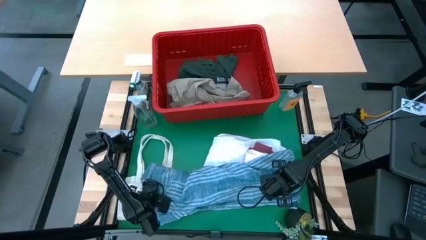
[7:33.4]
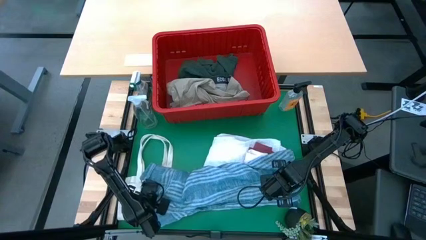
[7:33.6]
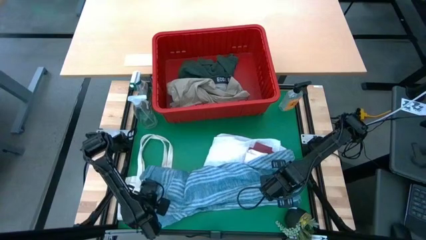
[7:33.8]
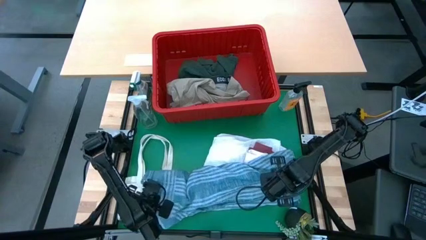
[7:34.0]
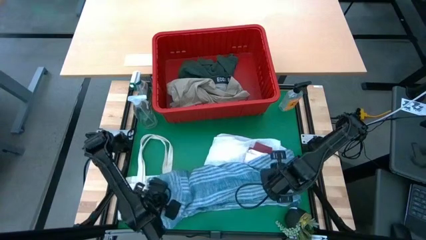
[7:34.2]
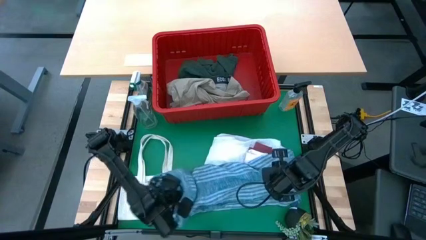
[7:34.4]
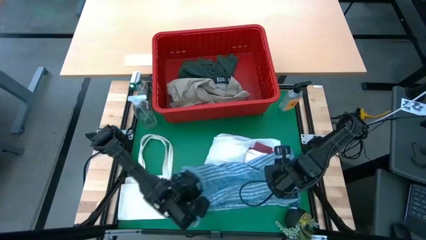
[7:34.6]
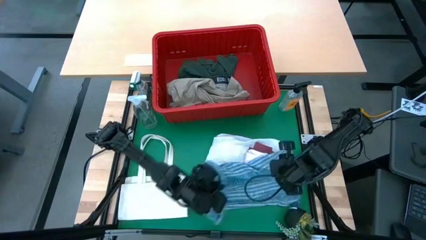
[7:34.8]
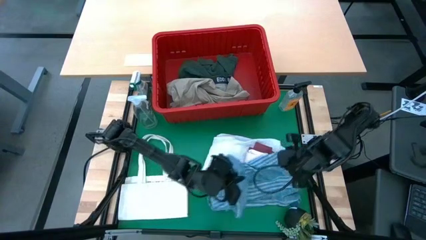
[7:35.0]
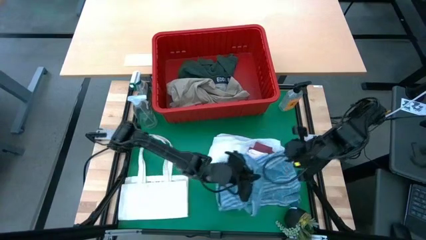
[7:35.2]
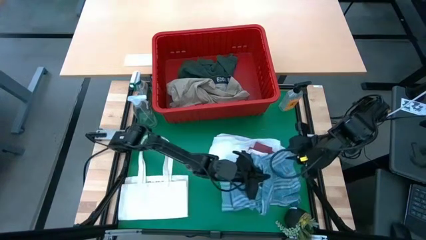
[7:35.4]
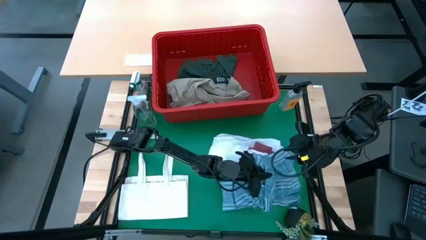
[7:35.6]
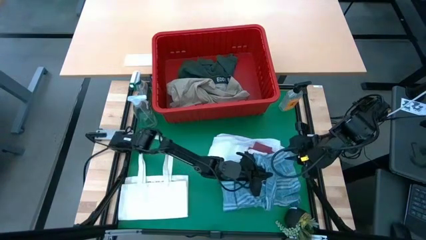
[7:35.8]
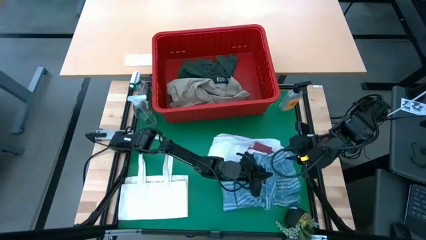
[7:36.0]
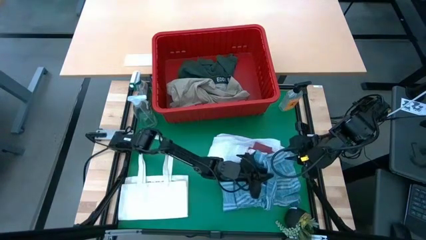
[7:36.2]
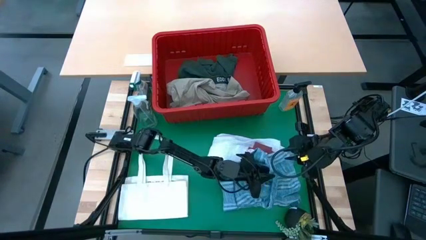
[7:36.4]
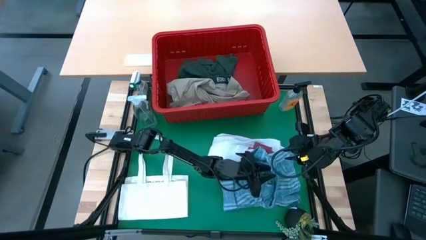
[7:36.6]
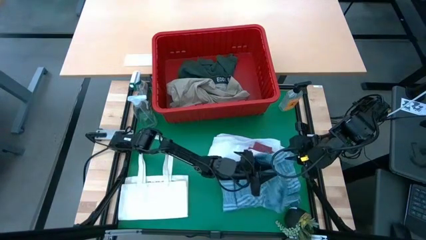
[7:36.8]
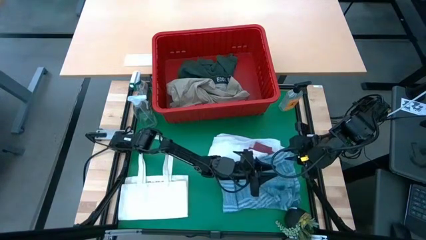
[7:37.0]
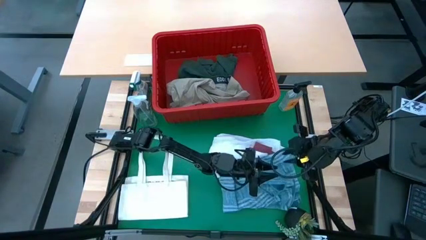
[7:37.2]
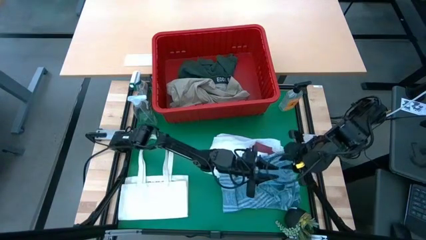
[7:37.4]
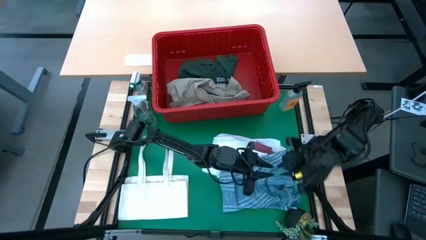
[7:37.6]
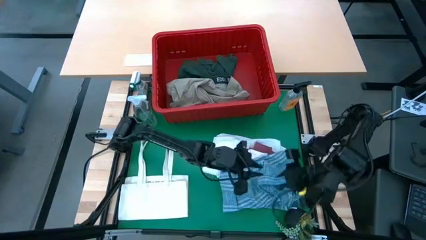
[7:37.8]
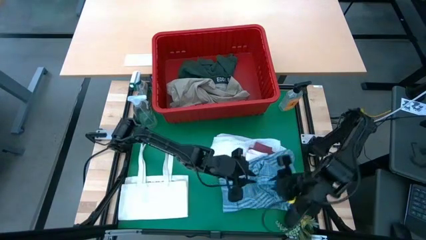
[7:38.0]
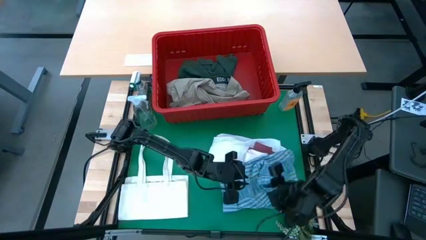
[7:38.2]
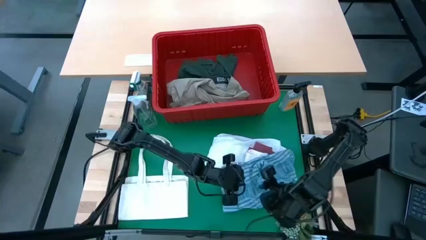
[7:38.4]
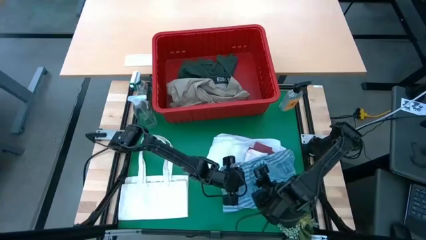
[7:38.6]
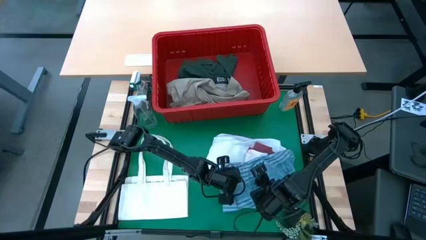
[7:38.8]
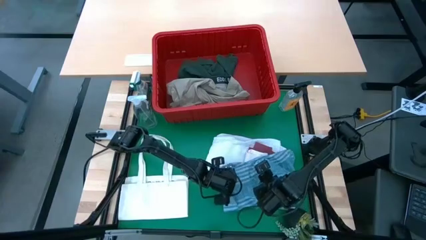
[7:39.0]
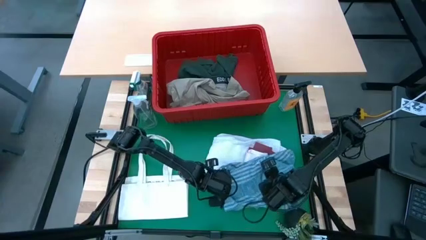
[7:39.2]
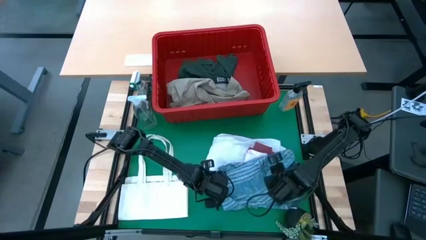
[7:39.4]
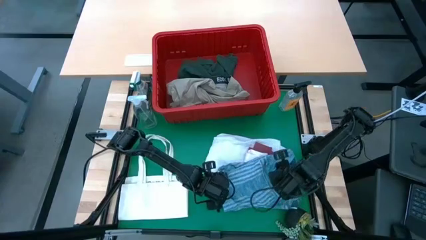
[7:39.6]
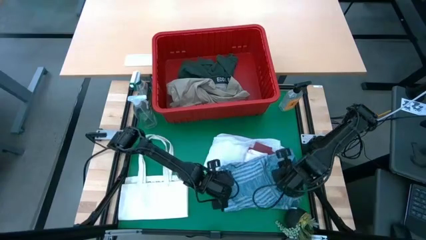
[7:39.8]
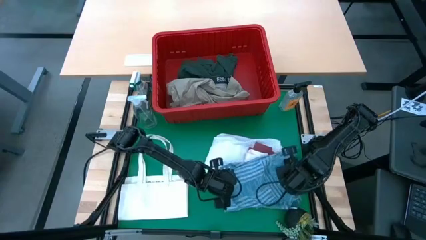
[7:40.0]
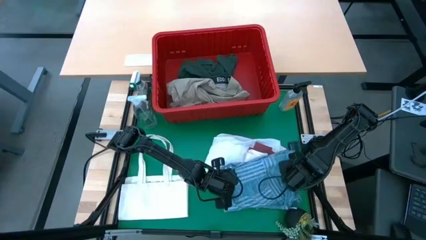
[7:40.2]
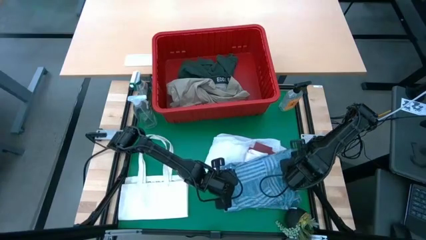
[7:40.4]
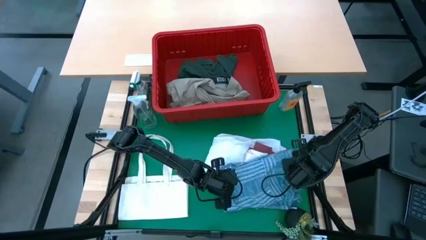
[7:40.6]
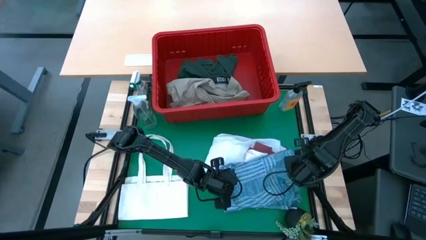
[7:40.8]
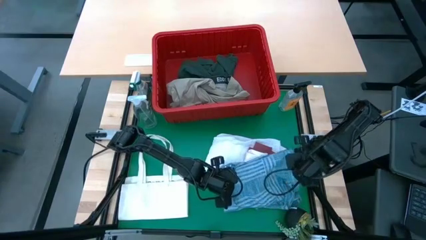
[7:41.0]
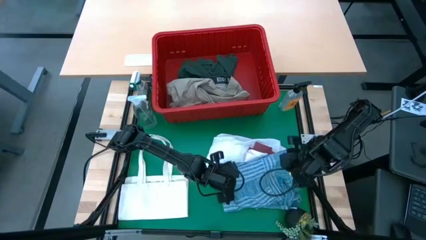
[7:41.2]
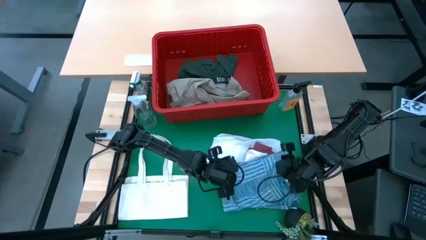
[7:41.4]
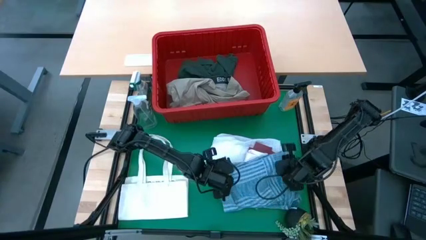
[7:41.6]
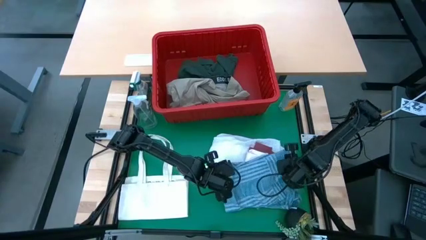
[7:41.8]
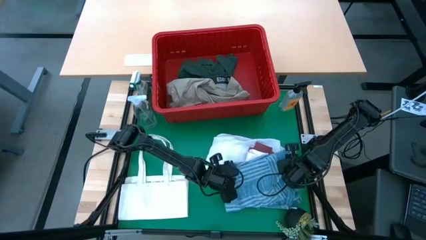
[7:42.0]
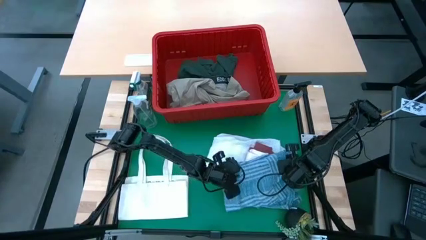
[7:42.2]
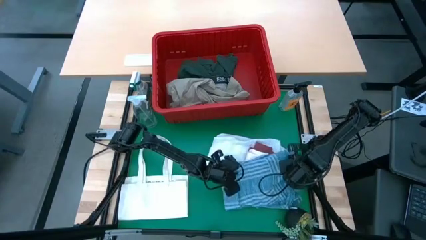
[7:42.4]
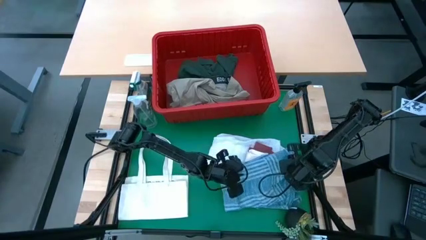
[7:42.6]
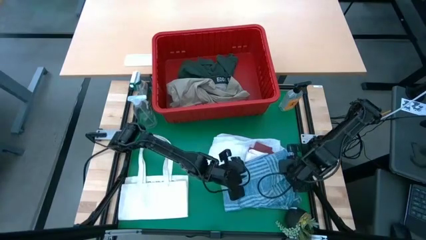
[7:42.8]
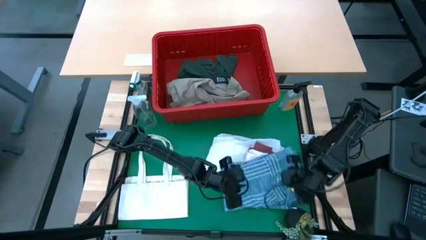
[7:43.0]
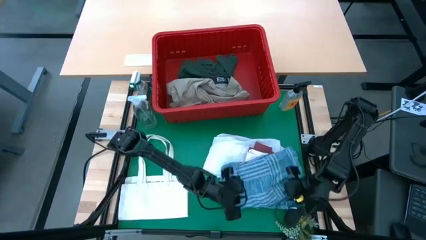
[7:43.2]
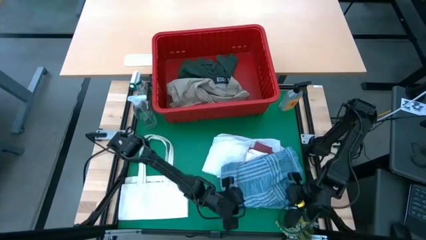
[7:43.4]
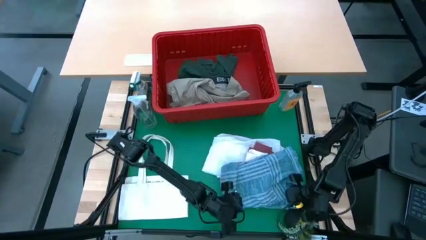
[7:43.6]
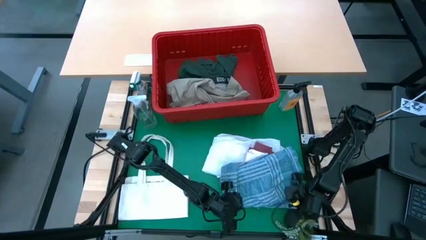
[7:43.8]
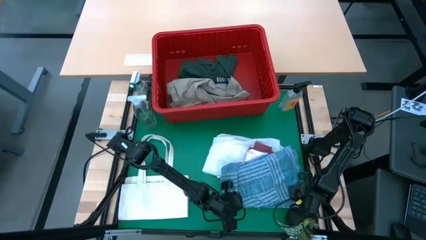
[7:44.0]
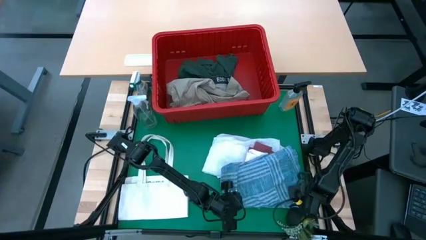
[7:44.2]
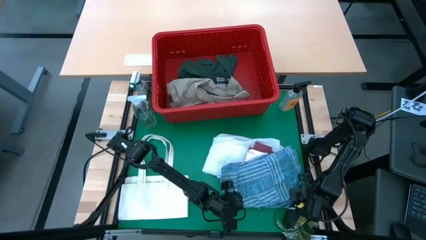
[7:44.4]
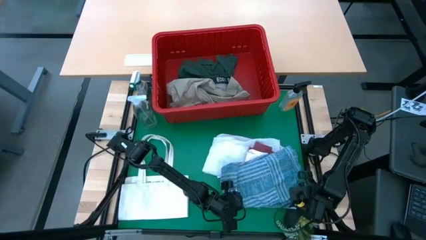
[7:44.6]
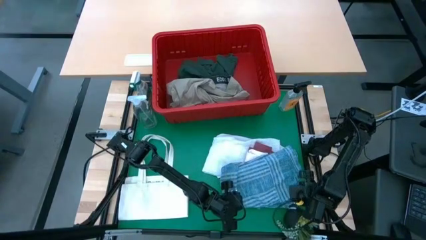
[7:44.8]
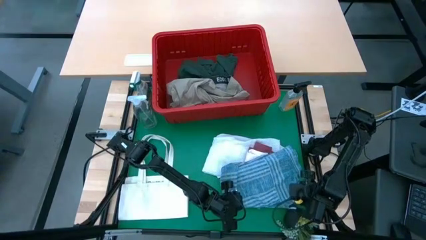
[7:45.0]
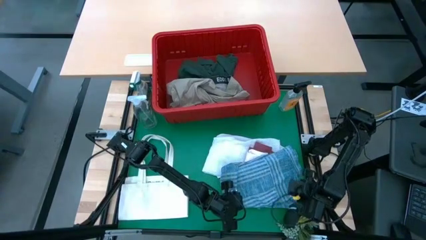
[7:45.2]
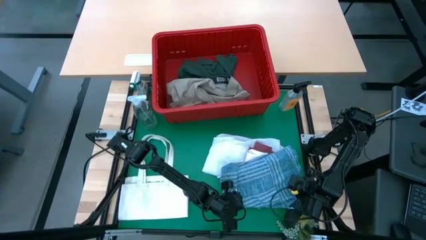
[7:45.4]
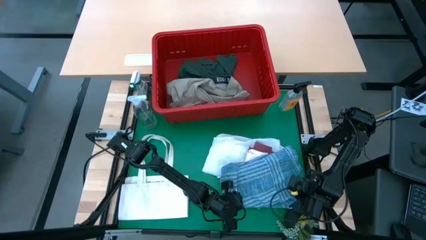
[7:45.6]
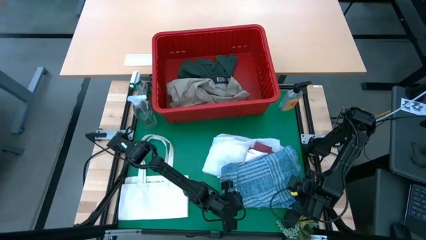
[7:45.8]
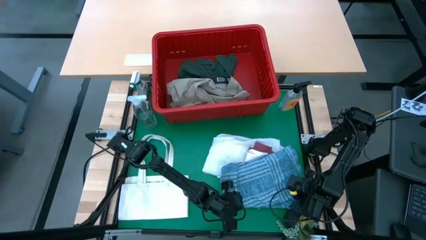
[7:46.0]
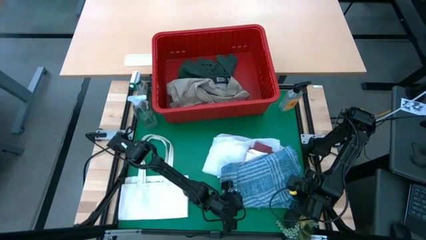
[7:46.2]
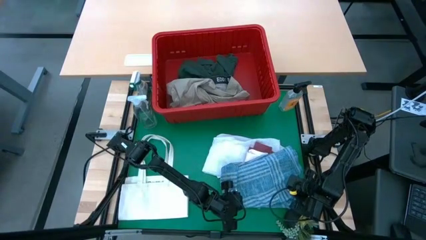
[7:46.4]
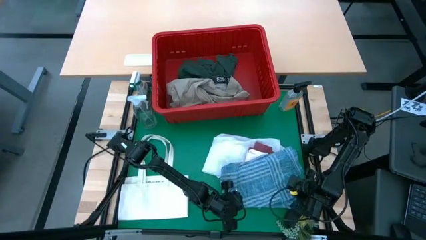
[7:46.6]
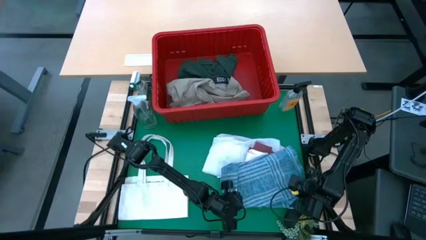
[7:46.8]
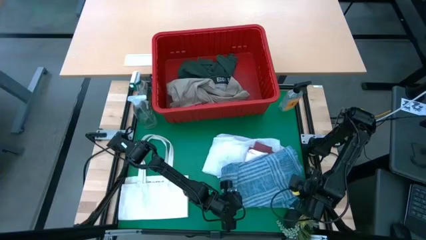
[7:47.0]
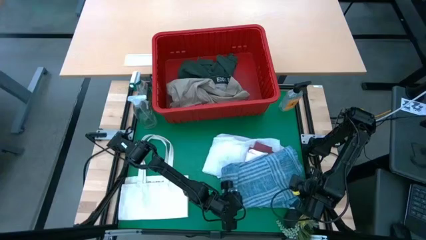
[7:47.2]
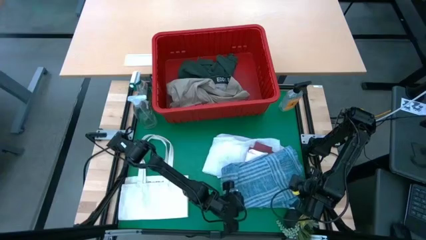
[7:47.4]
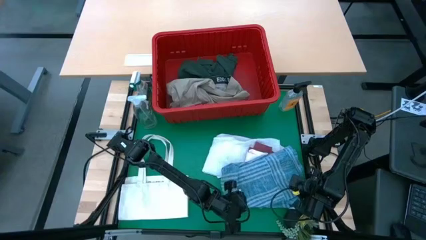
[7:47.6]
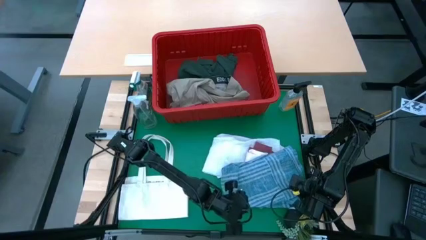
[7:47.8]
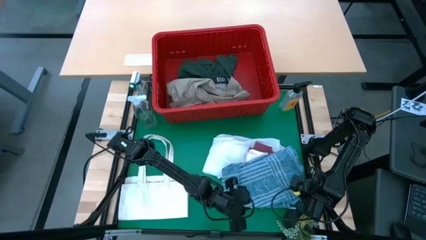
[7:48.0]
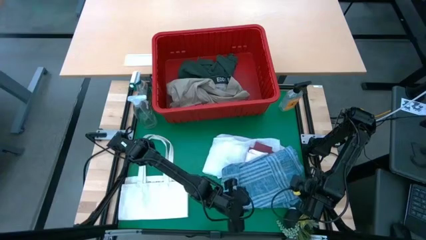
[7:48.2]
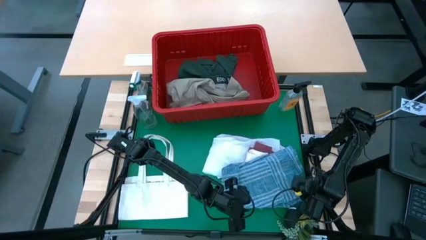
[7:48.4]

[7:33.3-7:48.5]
Task: Fold Laundry from Bin
Fold the blue checkered polo shirt
